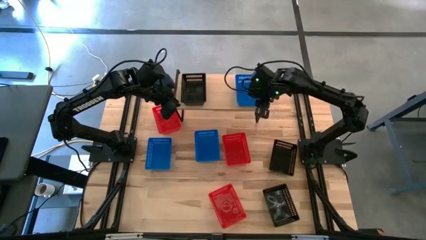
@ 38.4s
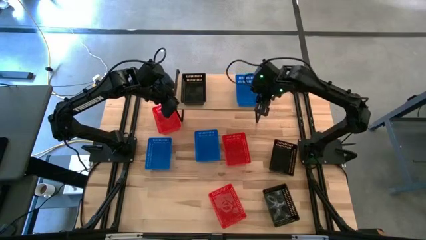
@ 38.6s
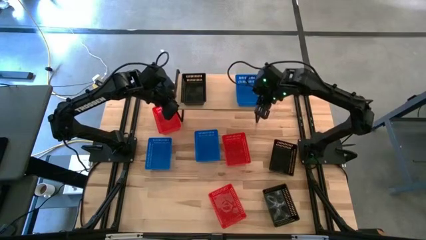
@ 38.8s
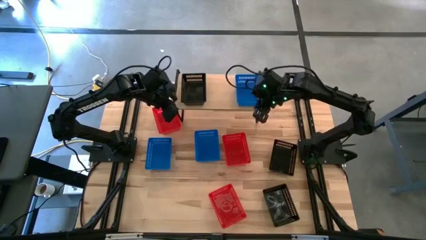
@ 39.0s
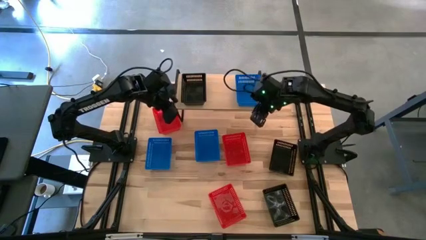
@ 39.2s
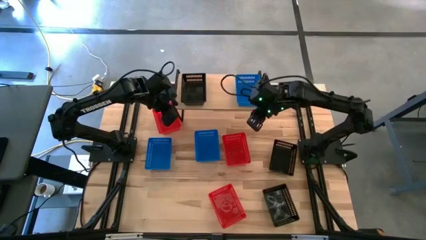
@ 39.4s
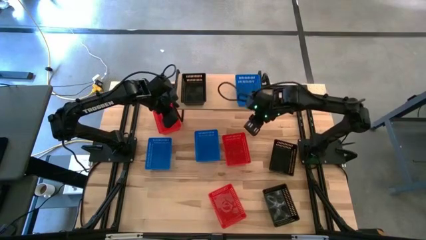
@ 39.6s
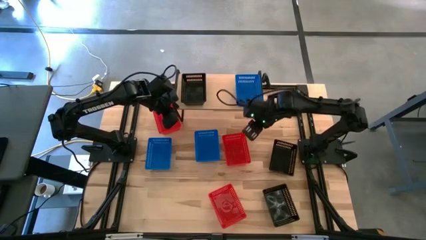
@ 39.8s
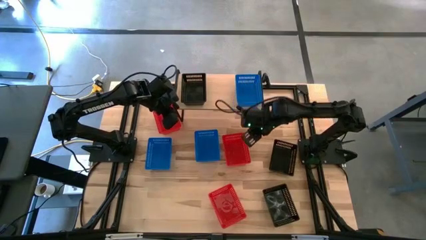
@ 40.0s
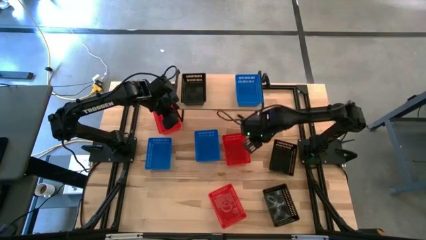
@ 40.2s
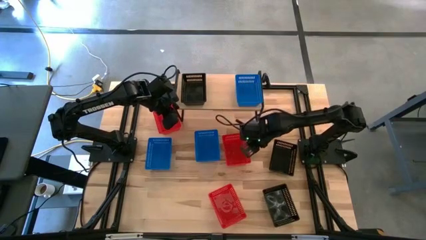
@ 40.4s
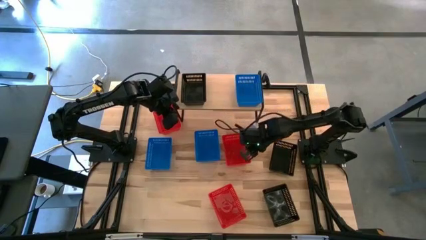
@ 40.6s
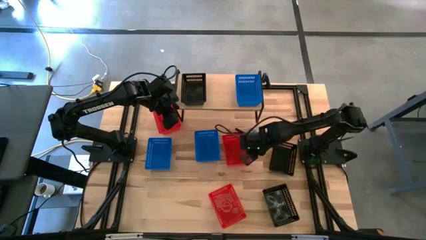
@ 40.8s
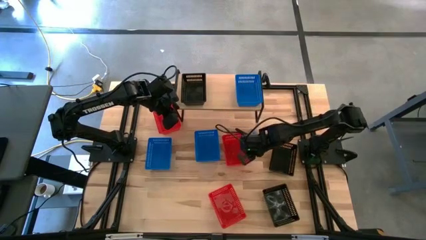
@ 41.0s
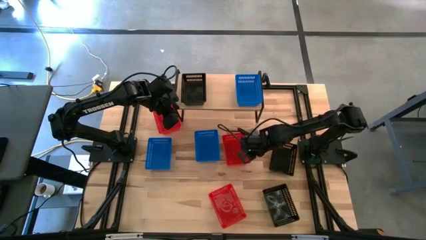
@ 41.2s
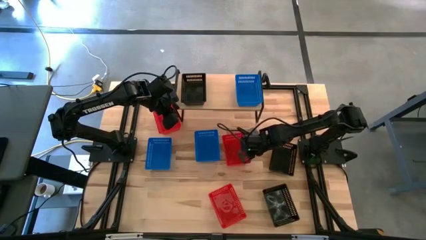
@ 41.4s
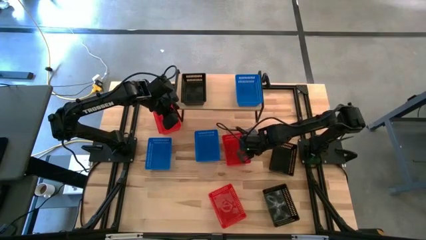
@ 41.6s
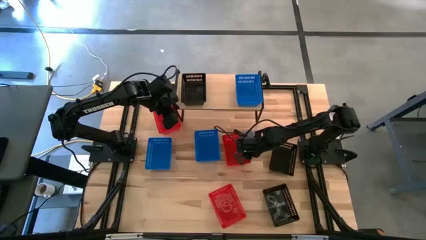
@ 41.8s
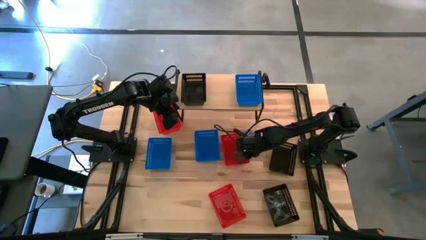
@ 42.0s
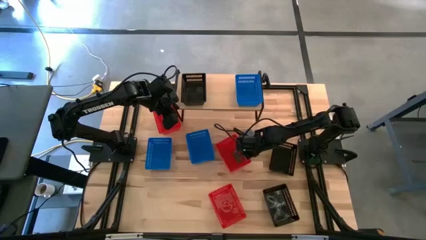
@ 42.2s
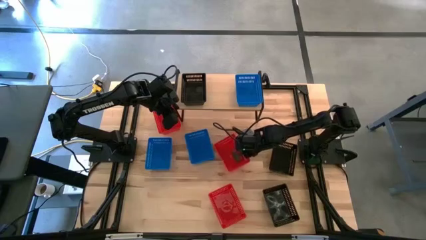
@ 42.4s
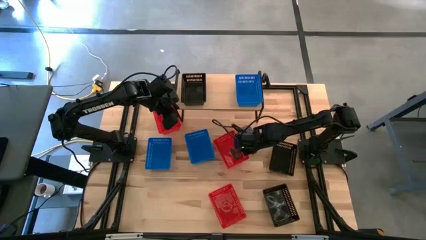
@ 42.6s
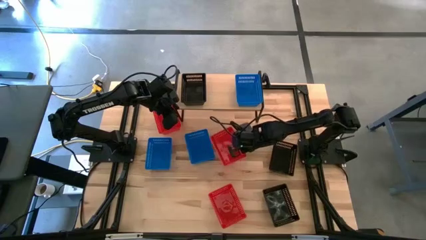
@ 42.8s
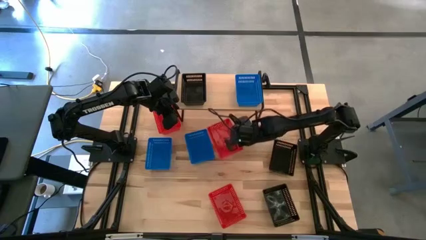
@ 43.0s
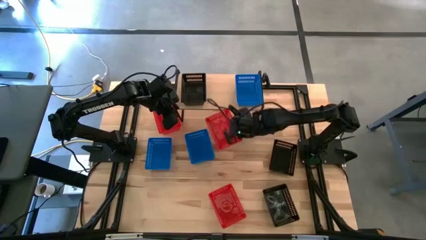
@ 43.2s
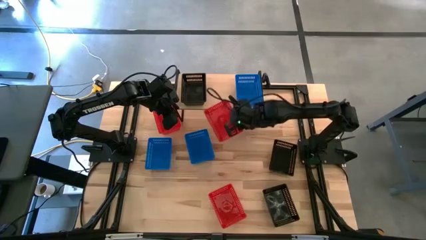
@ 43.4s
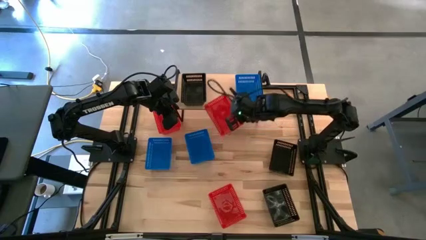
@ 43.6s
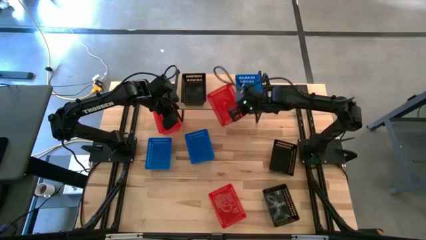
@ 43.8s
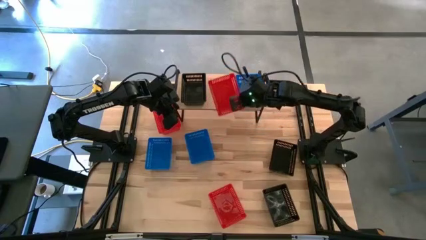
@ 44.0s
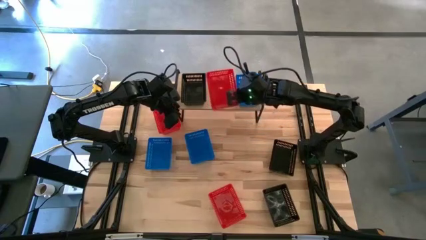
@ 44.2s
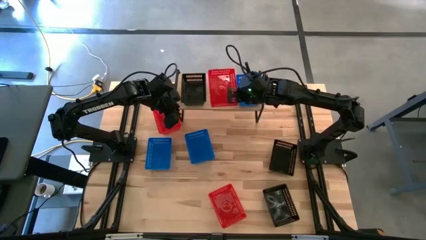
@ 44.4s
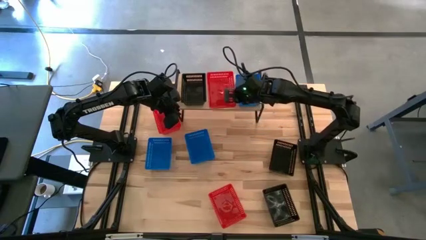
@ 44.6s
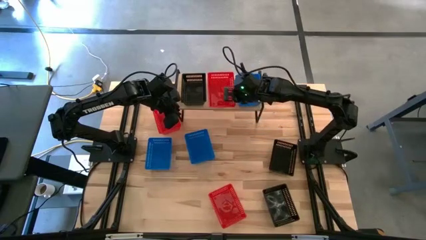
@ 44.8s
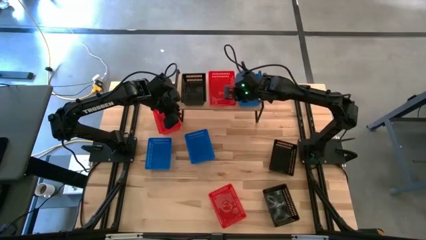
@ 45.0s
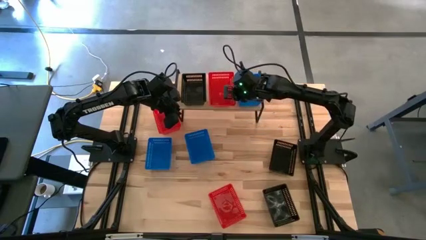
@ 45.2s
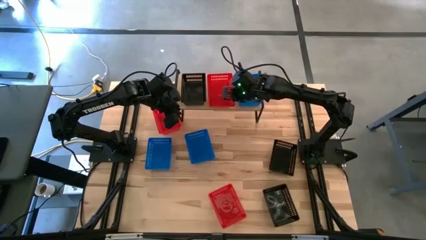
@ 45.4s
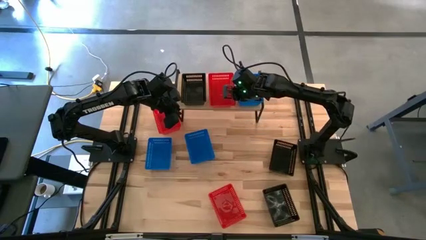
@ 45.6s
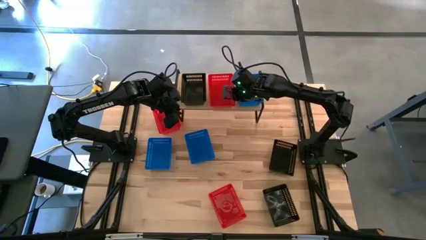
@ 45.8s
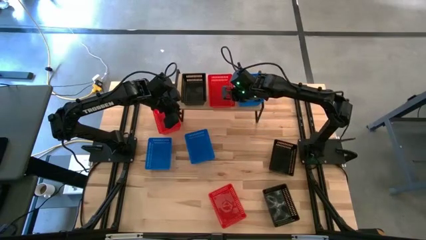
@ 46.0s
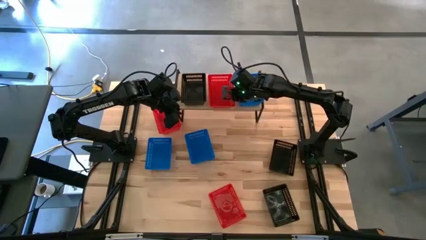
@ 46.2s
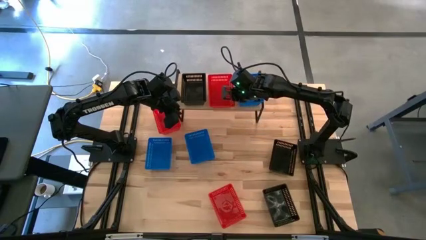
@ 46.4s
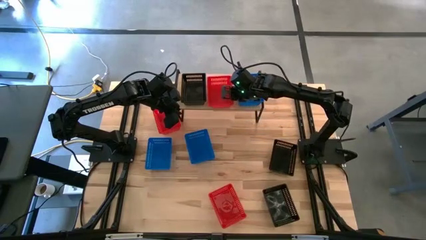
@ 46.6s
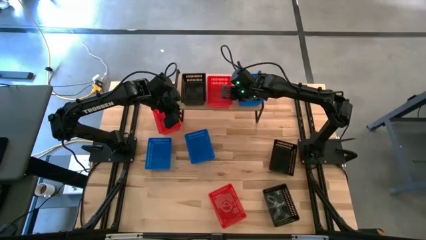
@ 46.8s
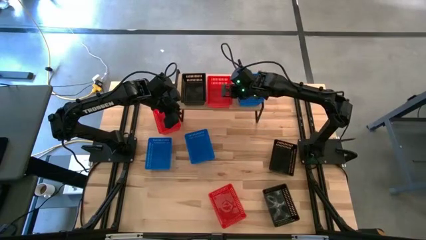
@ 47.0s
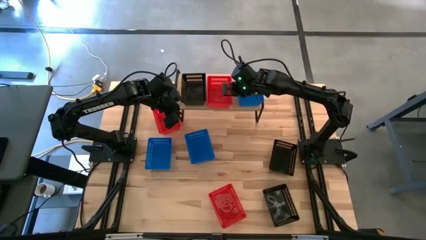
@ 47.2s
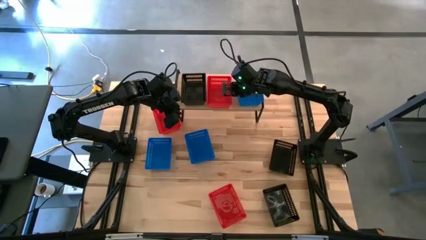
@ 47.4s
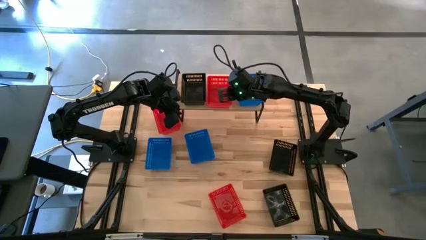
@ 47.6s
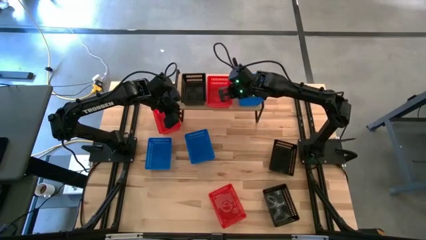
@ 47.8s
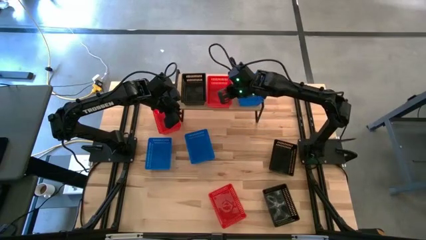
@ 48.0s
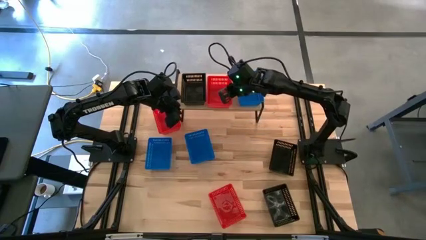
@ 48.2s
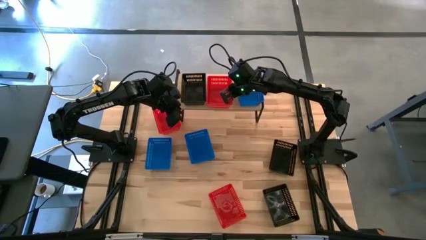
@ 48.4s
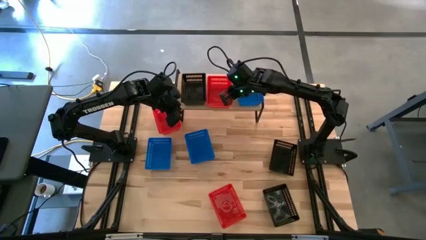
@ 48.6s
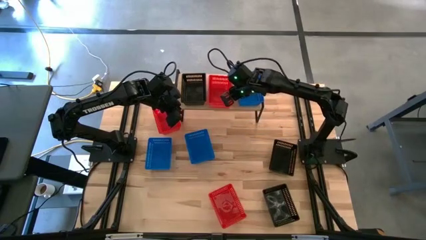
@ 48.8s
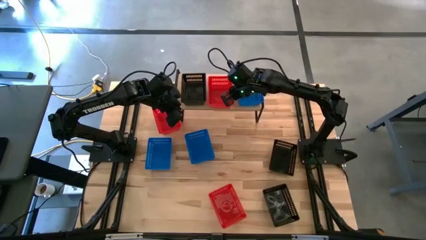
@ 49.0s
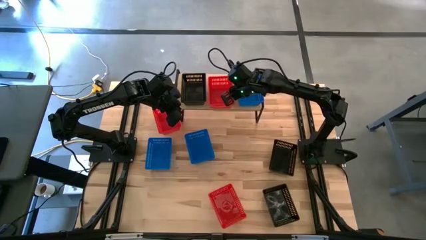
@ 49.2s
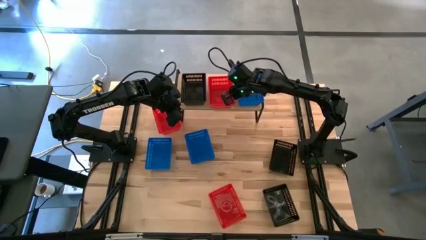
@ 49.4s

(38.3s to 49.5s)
Task: Stack baskets on shelf by color
Put the middle red bin on the shelf

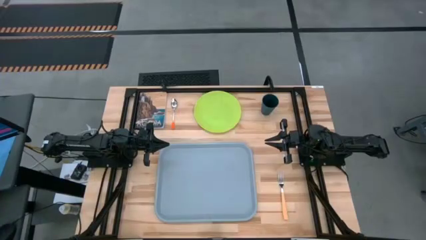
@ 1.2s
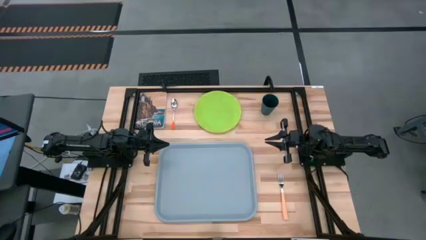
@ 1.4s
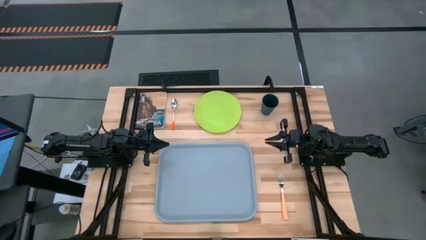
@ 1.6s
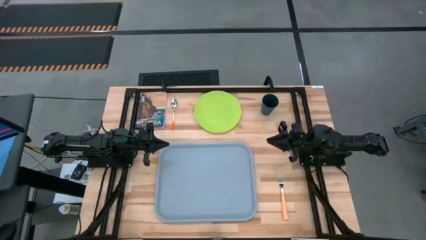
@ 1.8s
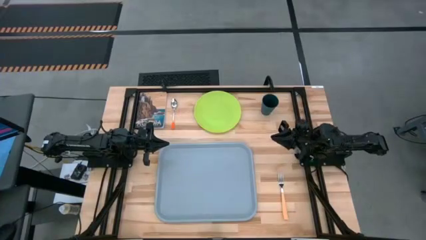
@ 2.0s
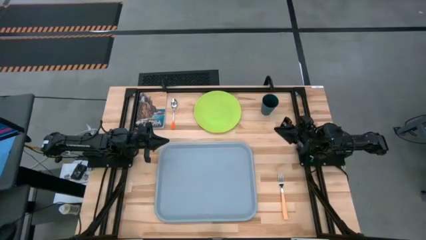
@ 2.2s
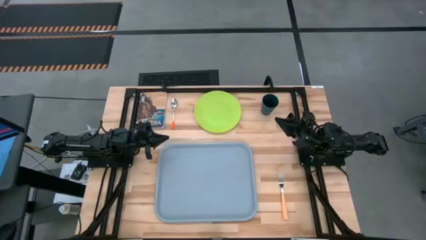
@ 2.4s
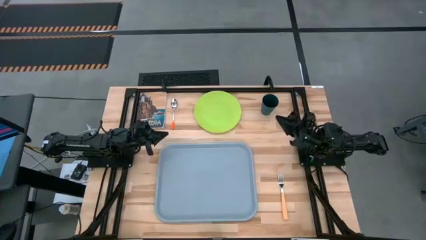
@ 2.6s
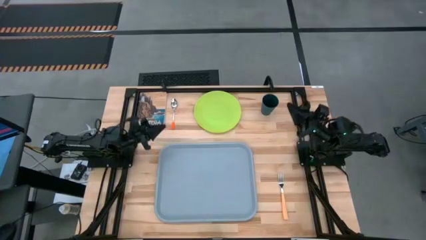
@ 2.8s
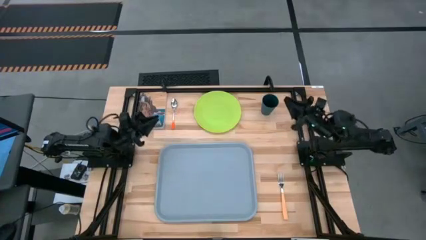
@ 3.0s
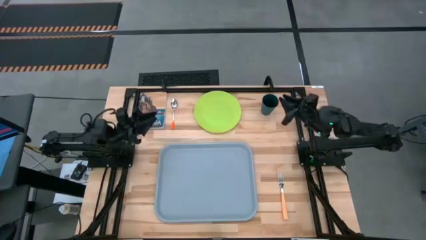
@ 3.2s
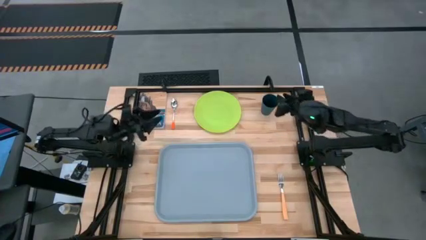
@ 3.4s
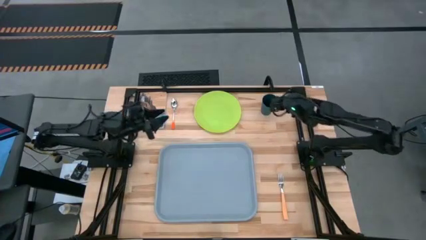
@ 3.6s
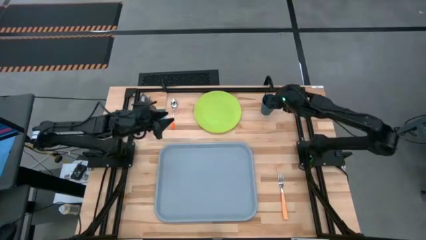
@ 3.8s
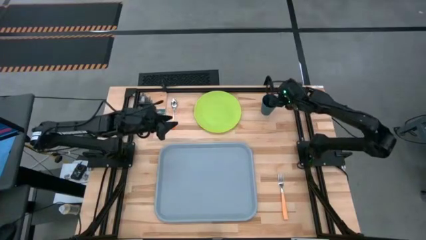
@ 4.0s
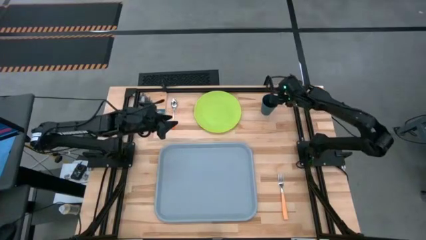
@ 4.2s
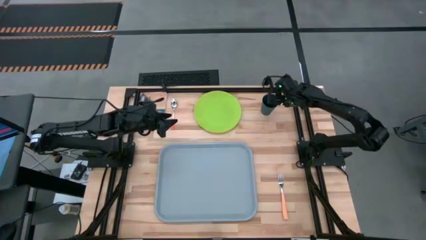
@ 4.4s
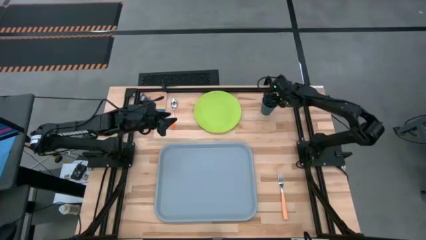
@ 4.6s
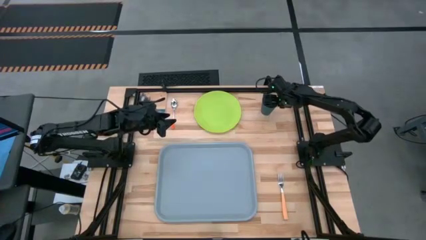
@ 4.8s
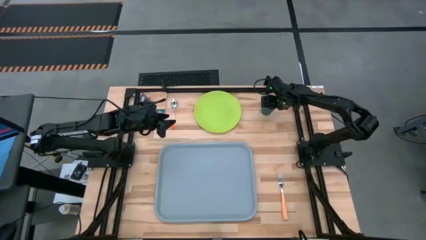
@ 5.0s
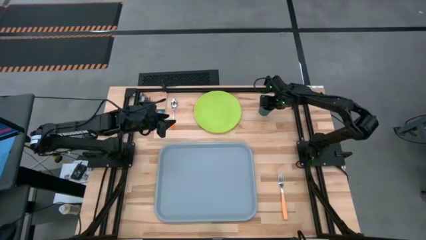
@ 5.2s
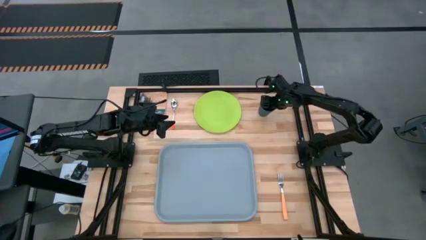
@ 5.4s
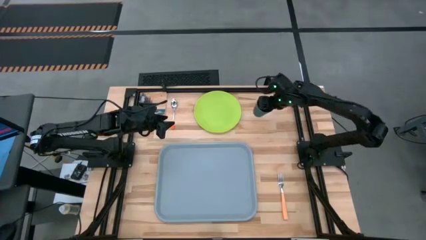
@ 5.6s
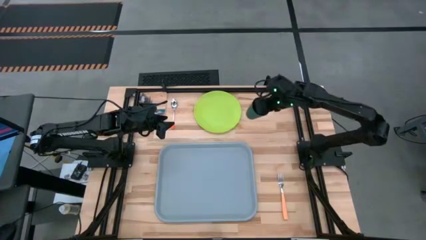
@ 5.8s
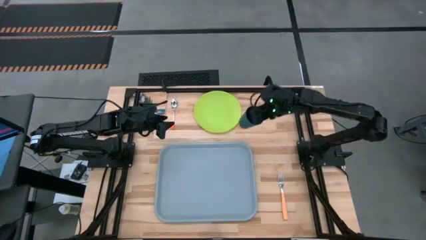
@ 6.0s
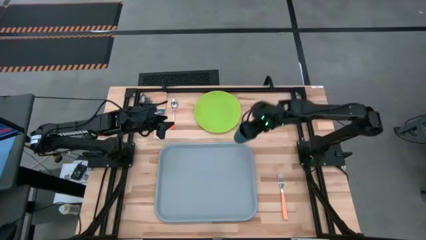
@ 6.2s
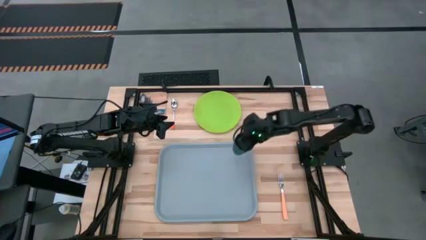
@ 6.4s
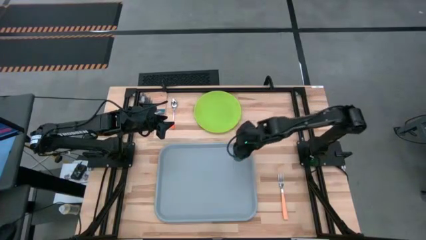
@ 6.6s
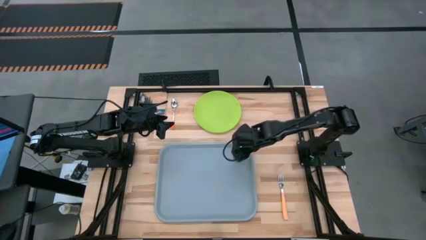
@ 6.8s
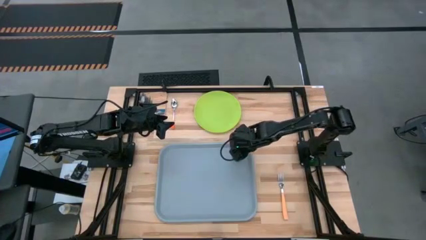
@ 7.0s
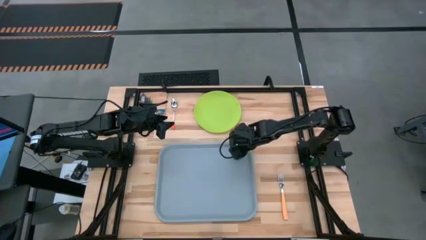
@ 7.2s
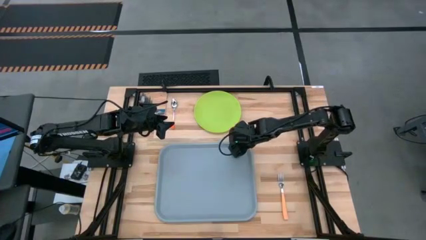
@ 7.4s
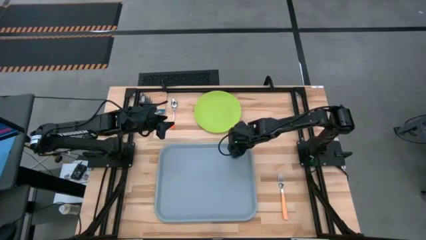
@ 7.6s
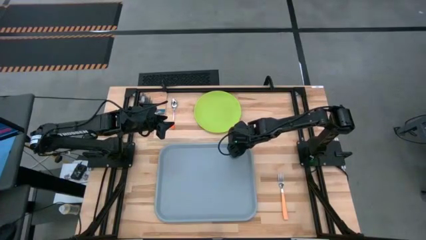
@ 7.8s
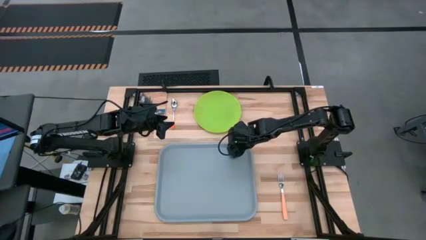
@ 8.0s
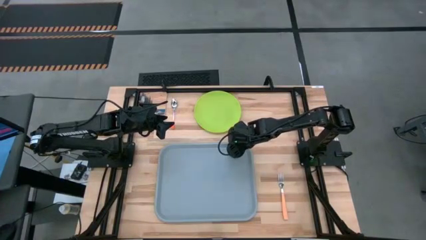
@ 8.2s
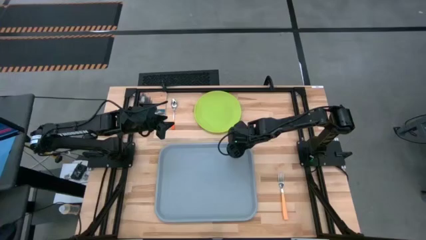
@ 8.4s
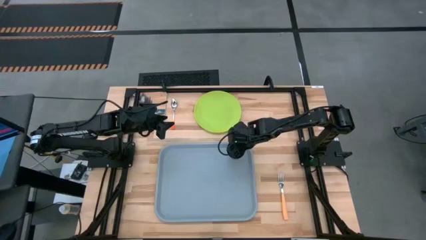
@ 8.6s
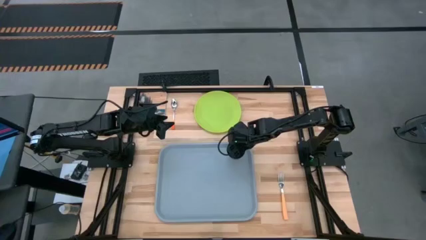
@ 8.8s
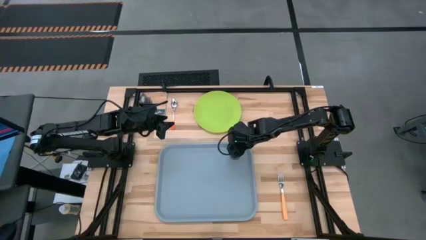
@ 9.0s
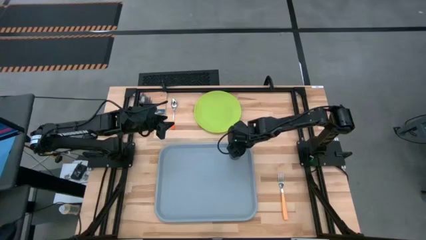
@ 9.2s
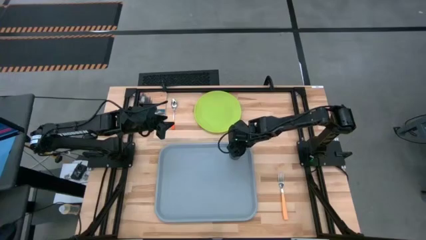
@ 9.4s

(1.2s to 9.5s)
Task: Pick and place plate/cup/fork/spoon on tray
Put the dark blue cup on the blue tray
